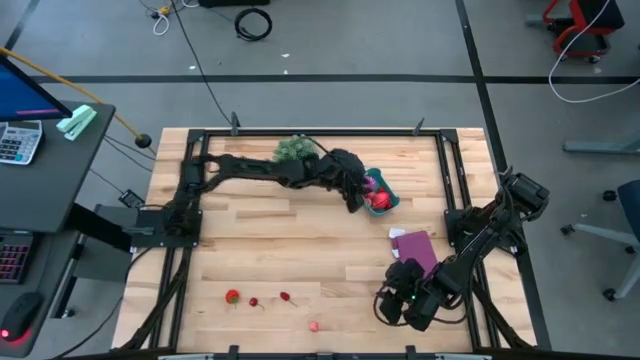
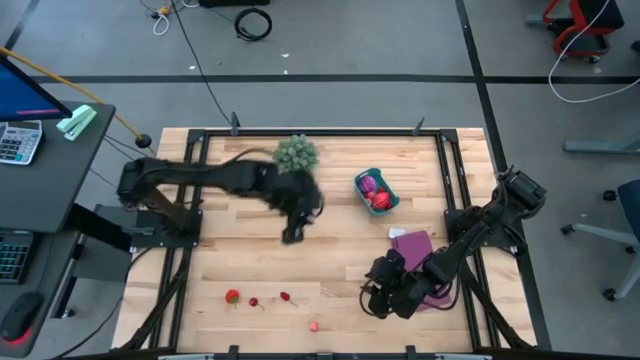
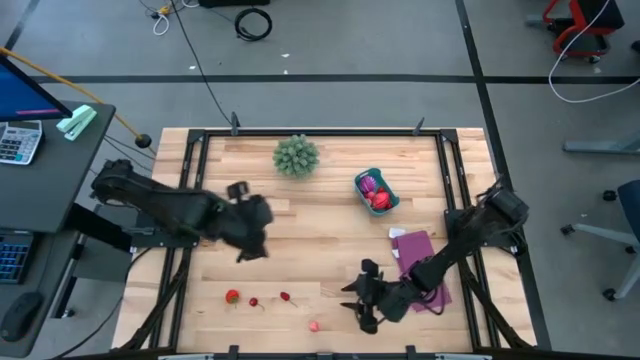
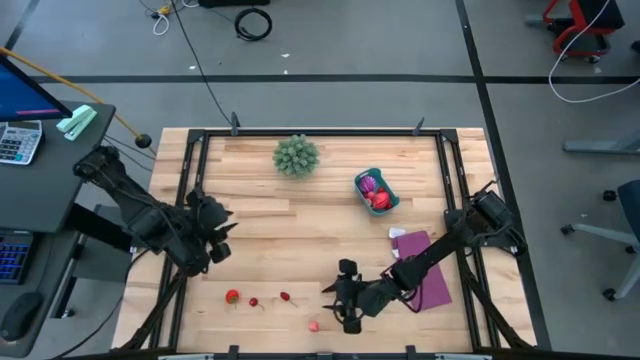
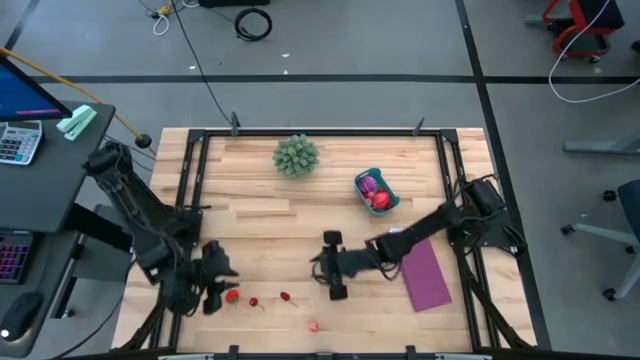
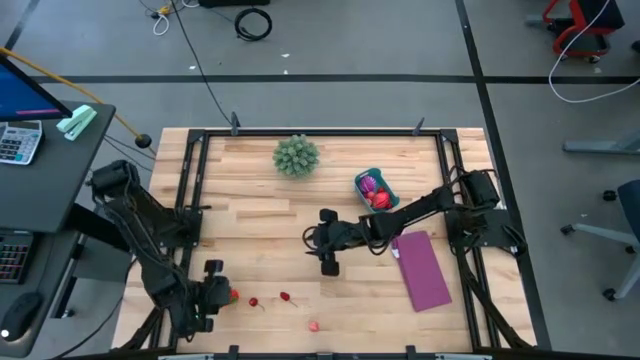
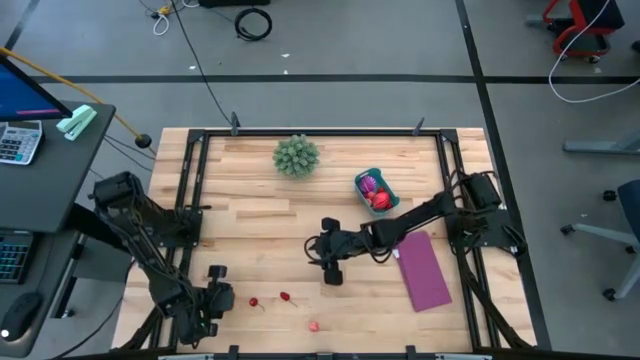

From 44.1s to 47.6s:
Task: Pick and placing Produce into tupperware
Put the red strawberry into the blue bin

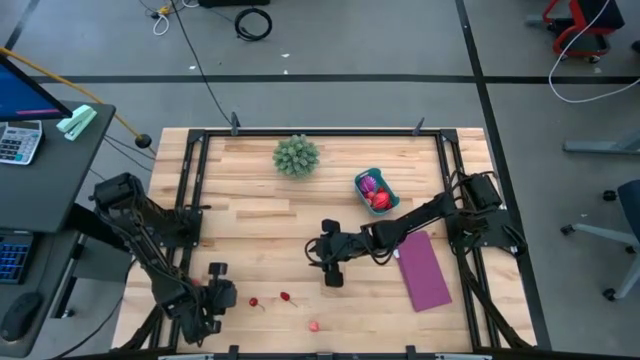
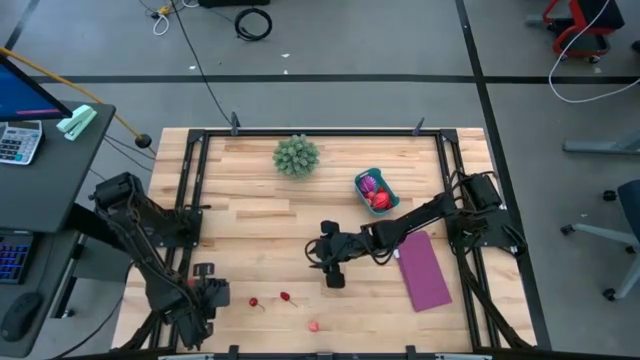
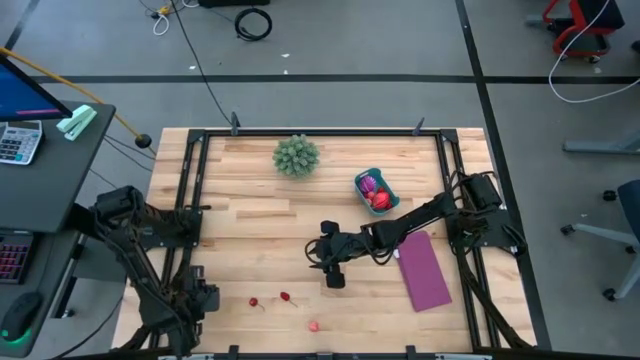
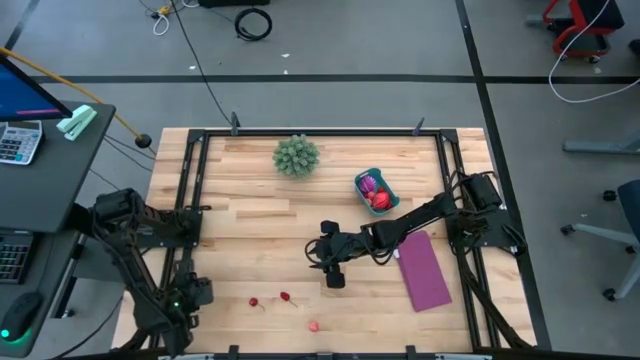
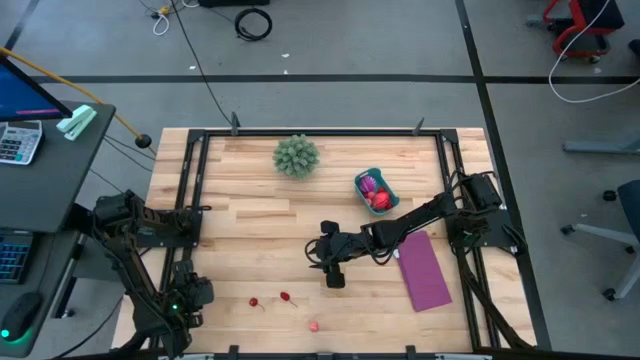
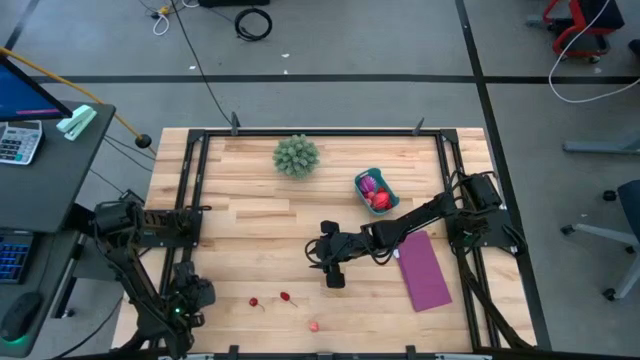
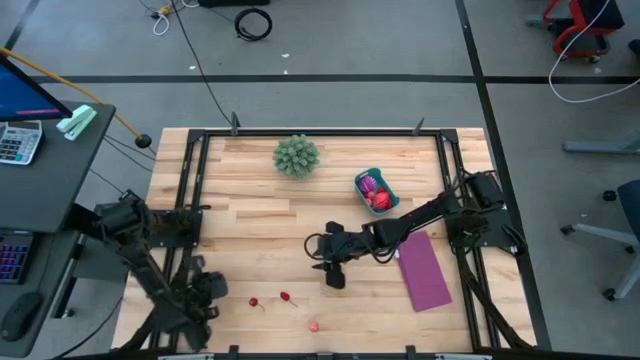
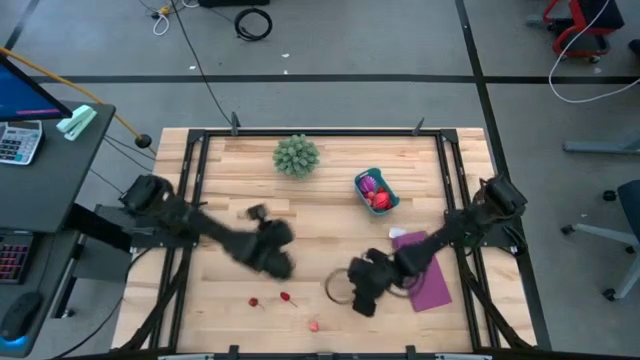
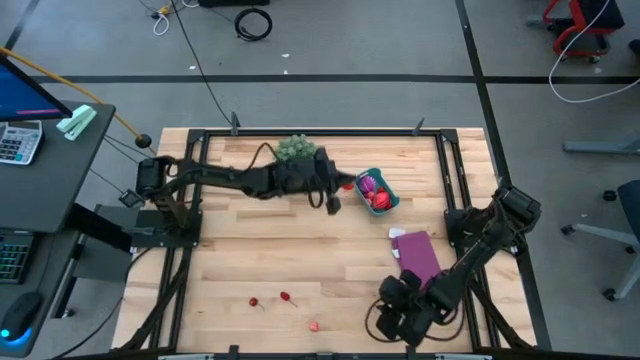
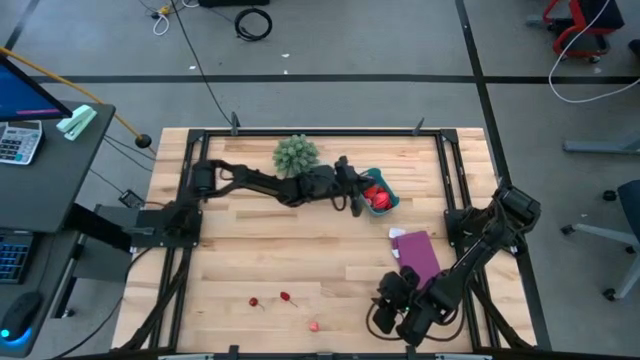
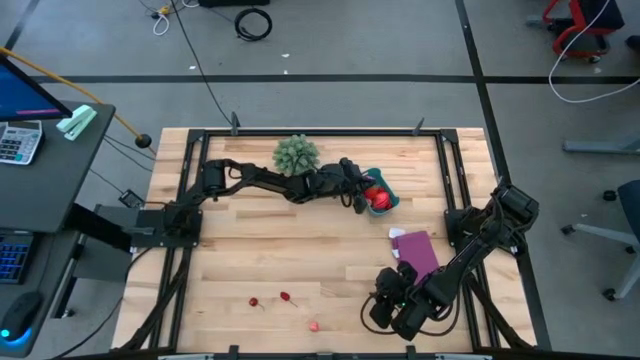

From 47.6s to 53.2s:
Put the red strawberry into the blue bin

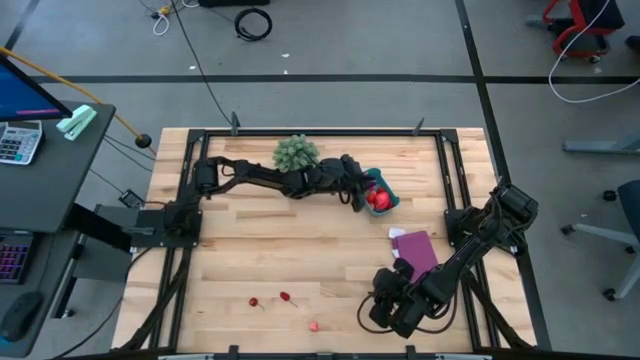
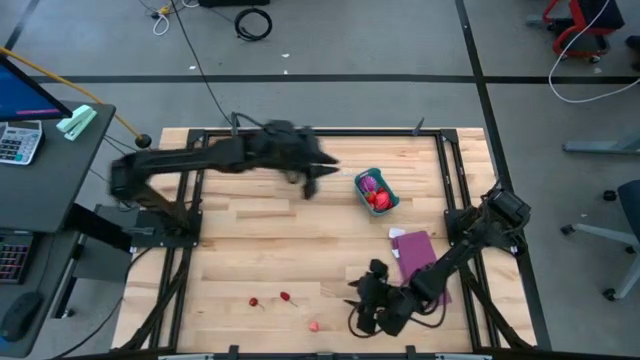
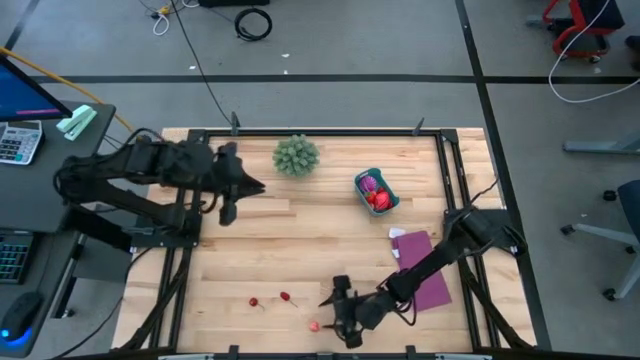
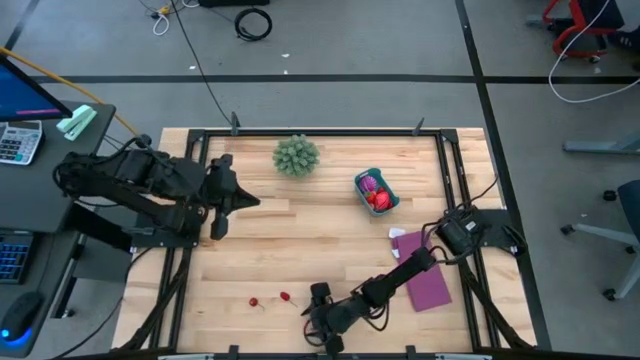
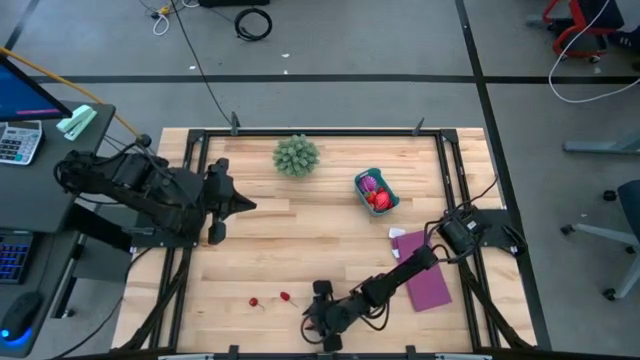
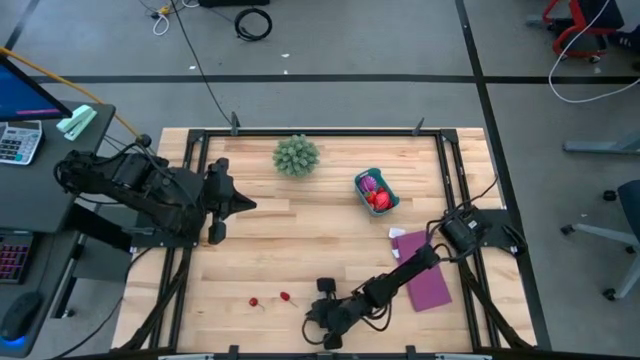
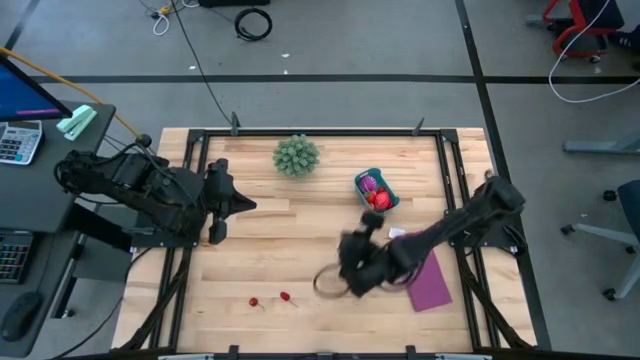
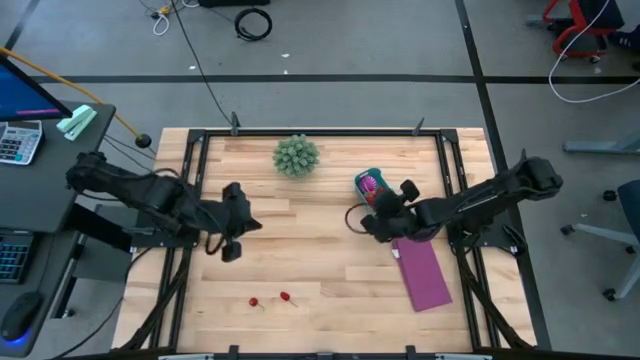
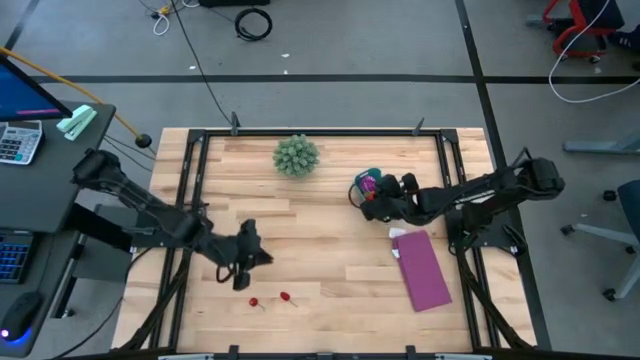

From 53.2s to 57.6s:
Put the pink peach into the blue bin

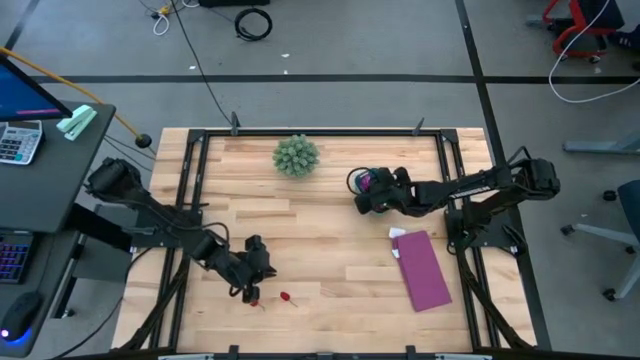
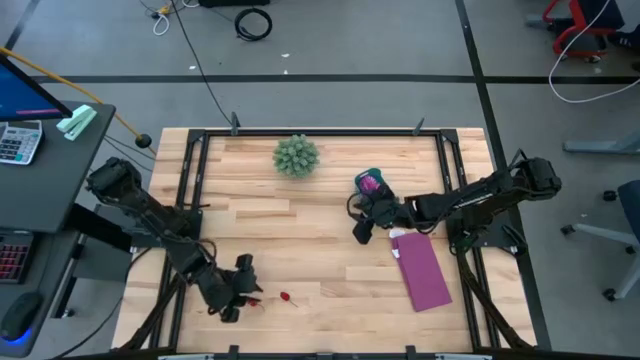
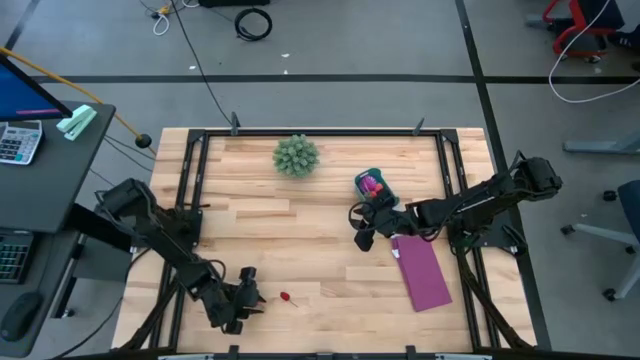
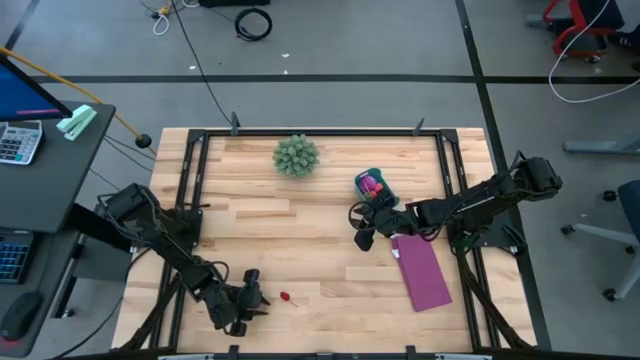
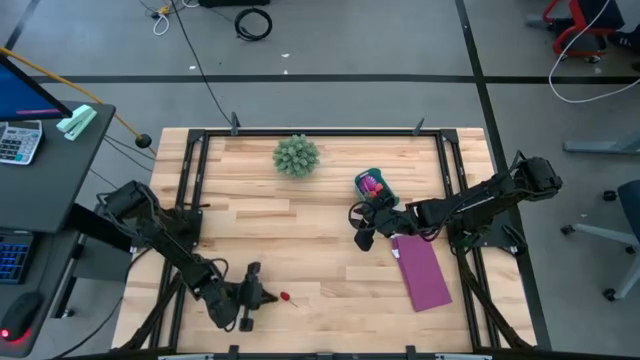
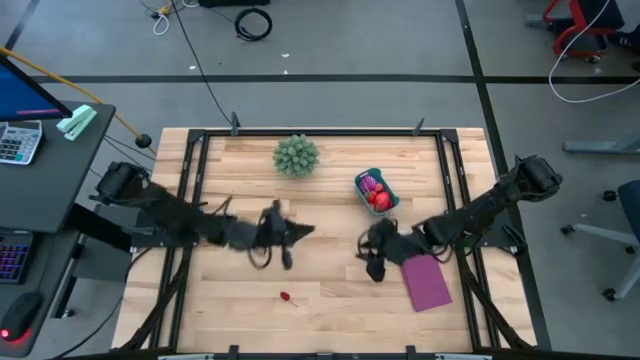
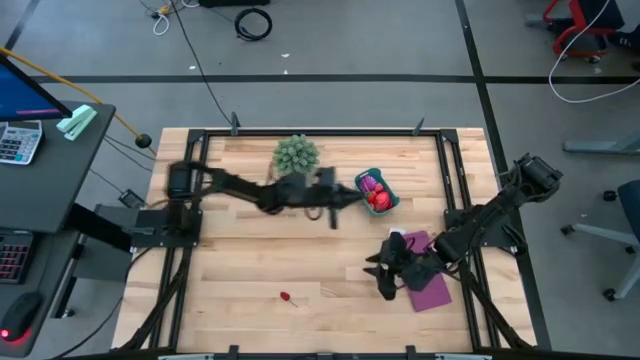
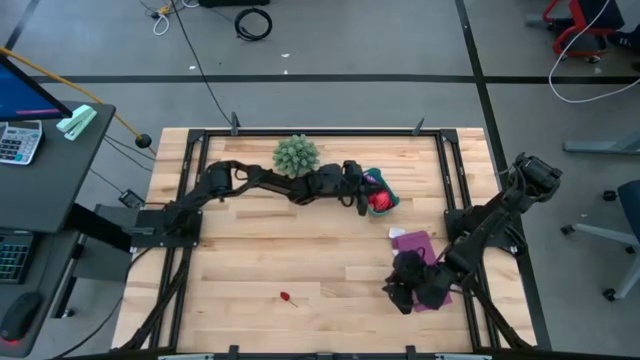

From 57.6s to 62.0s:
Put the red cherry into the blue bin

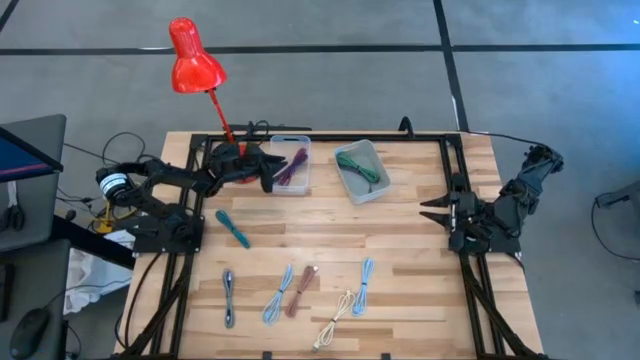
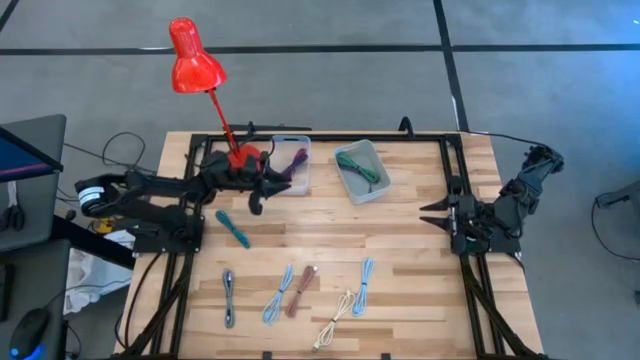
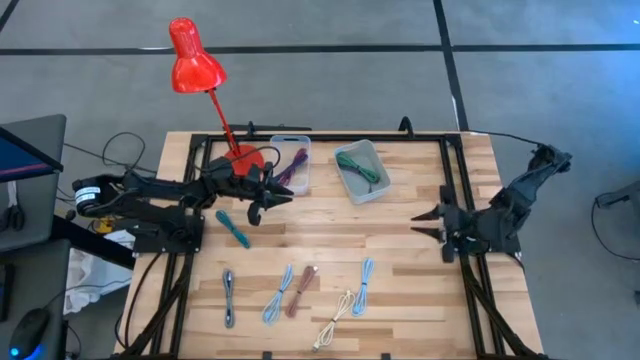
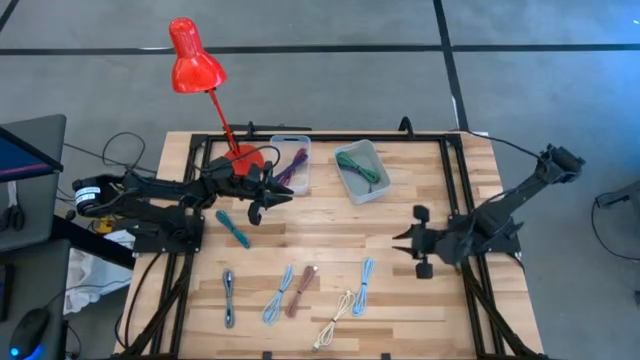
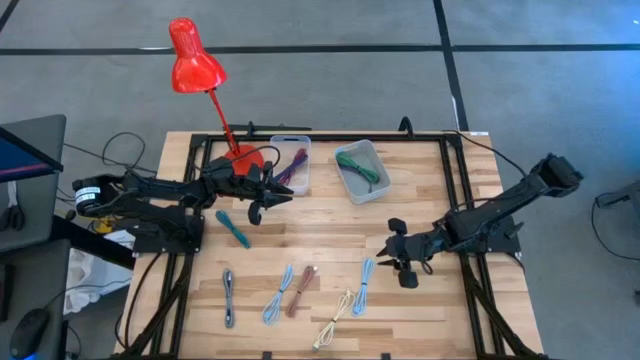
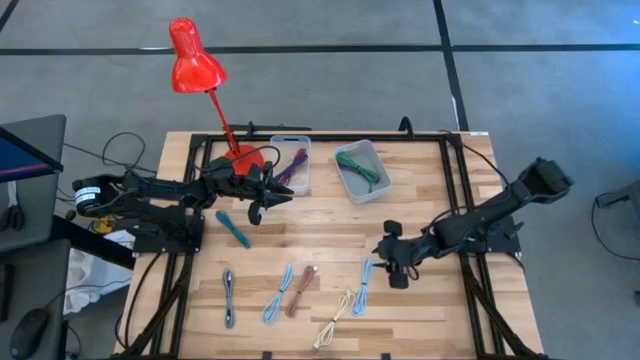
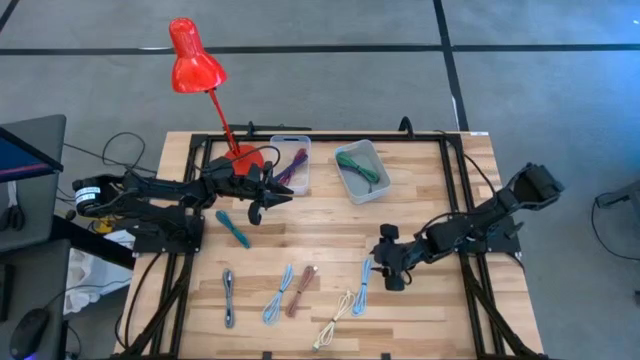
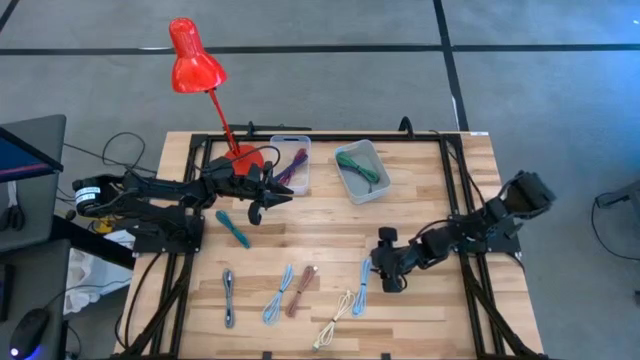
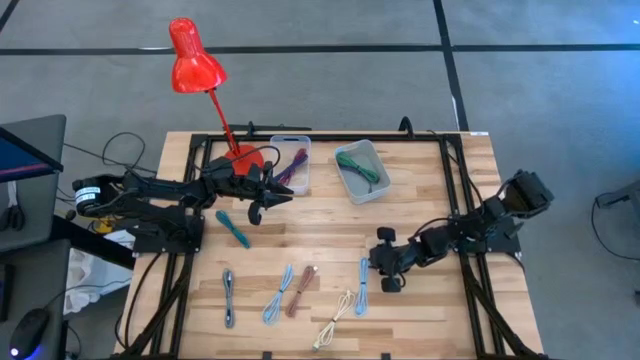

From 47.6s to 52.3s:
Task: Pick & Place USB Port
Put the right light blue USB cable into the gray bin
